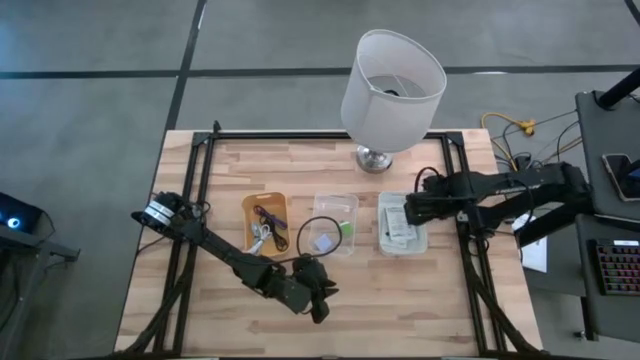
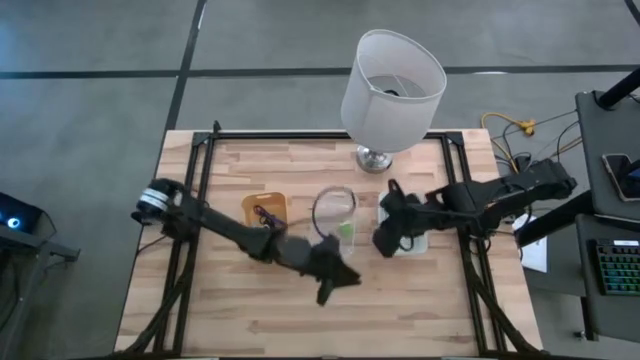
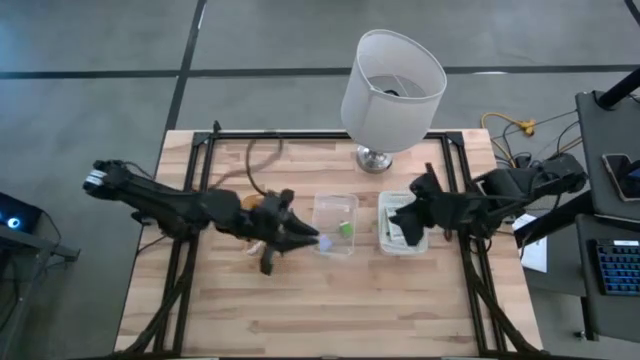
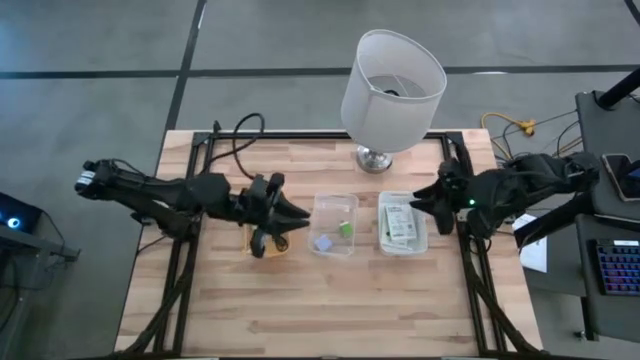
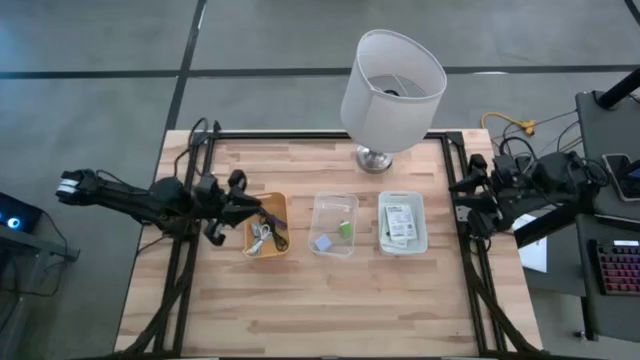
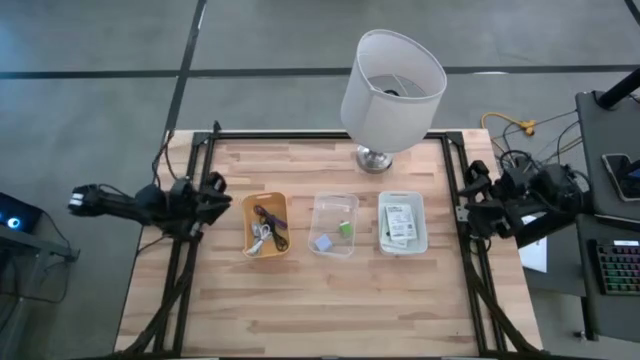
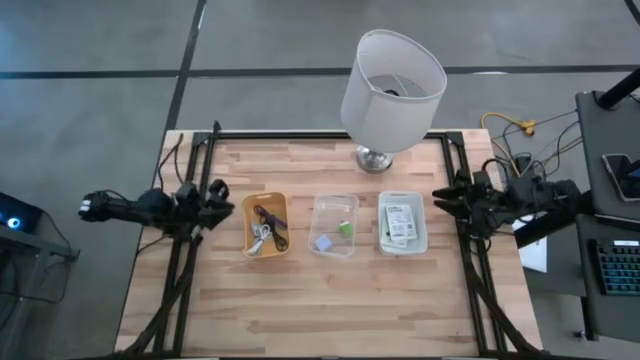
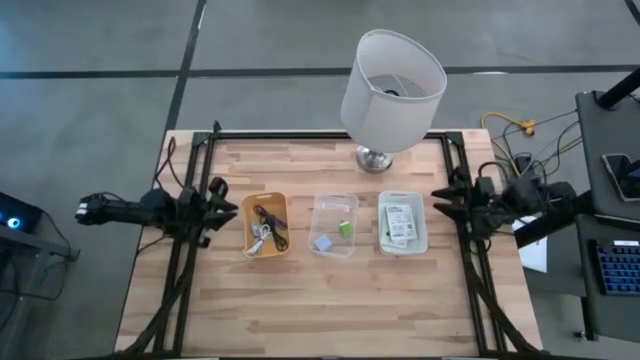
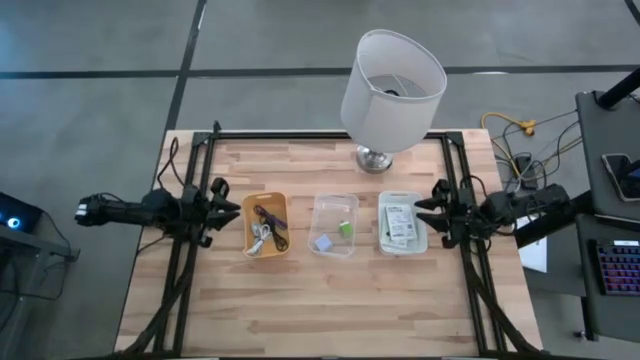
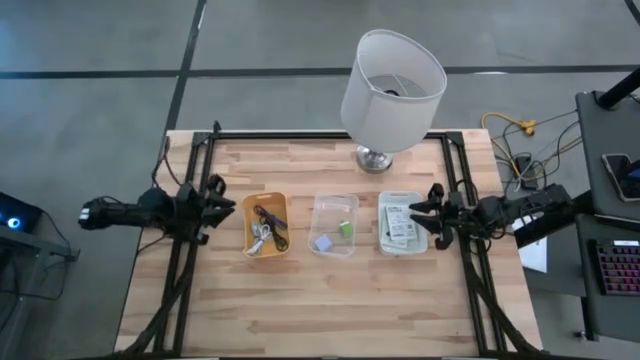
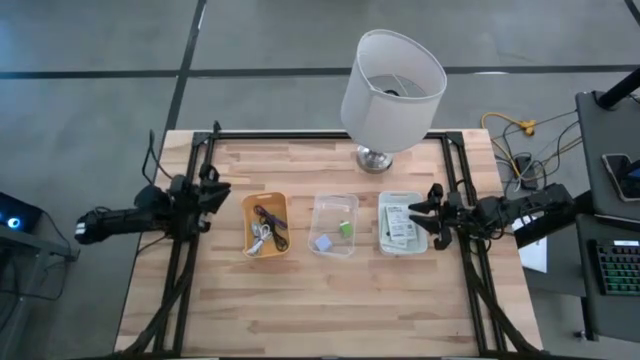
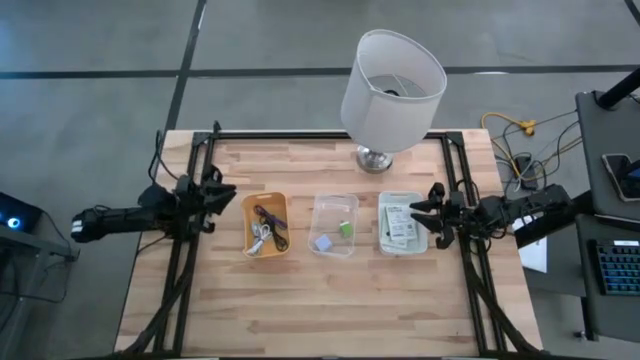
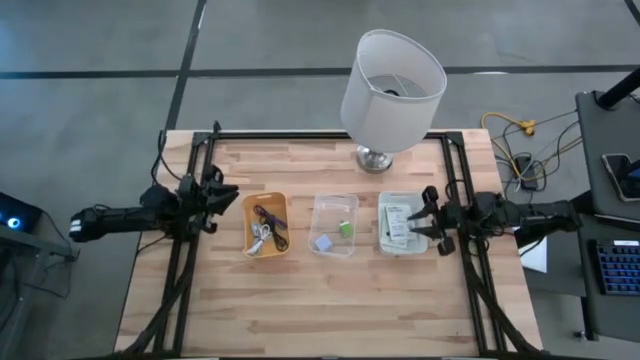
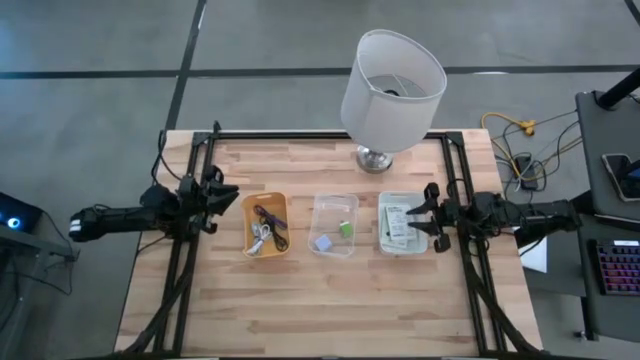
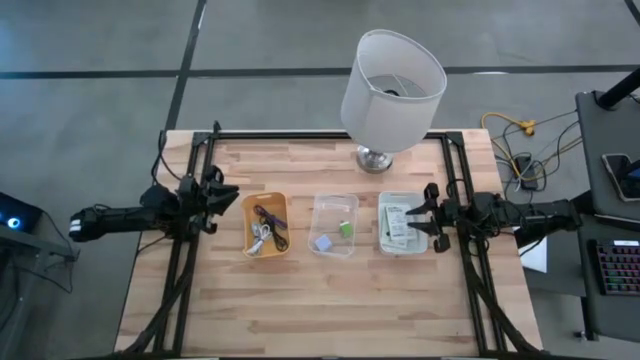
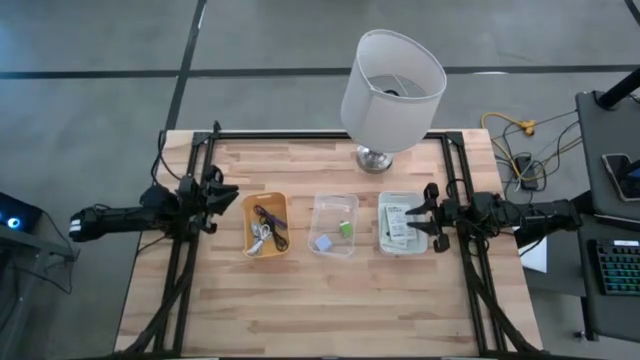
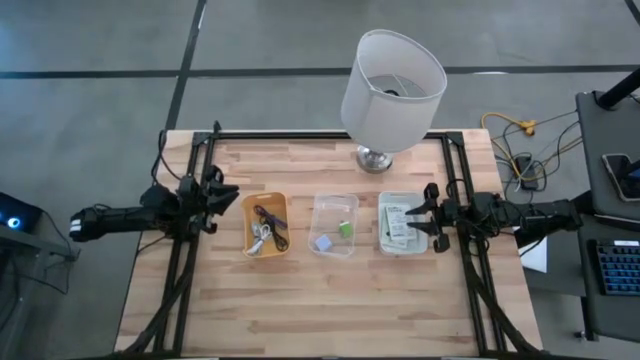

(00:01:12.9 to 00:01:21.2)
Task: Pick and place items into bin
Return to Home Position

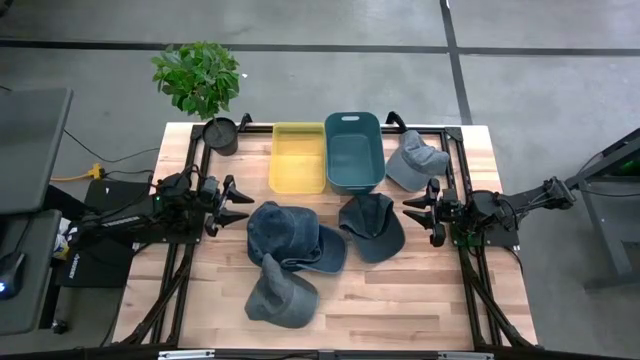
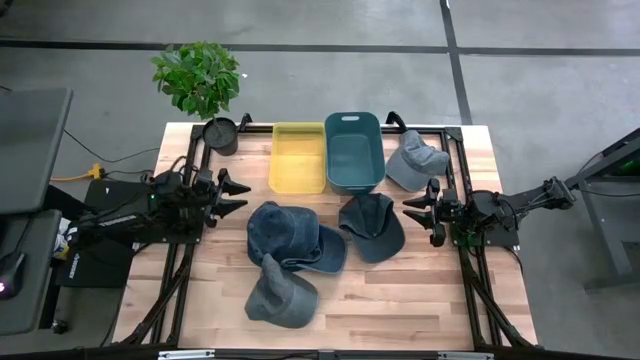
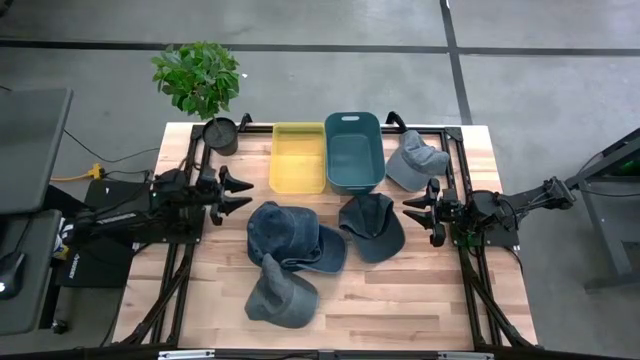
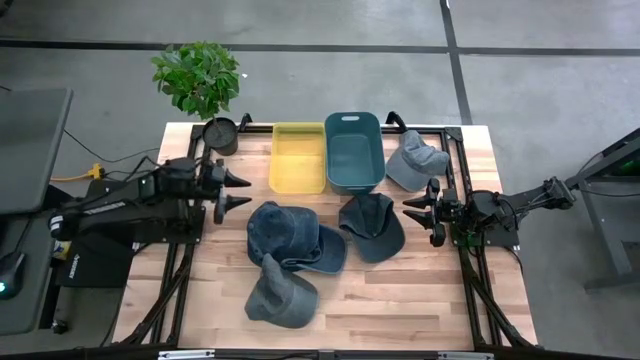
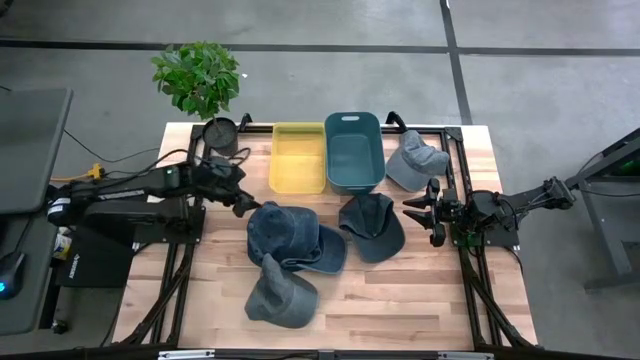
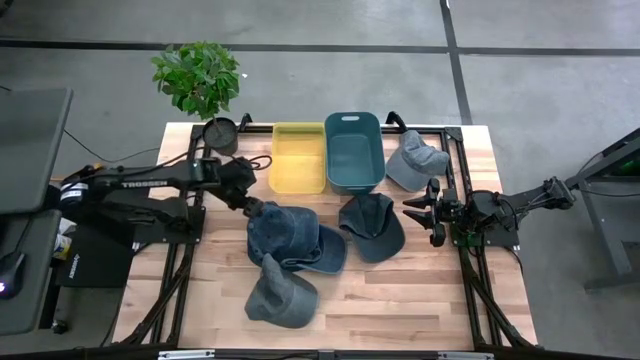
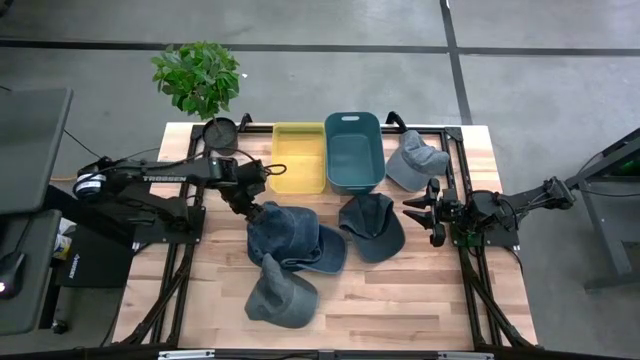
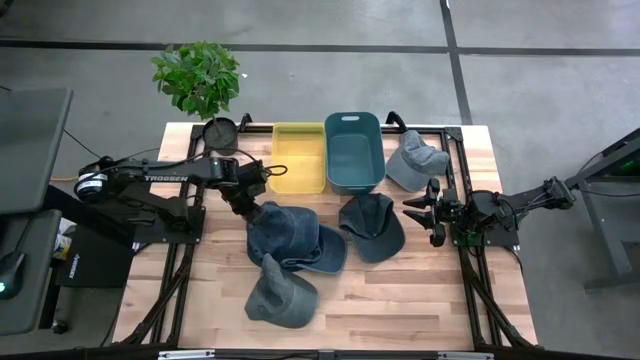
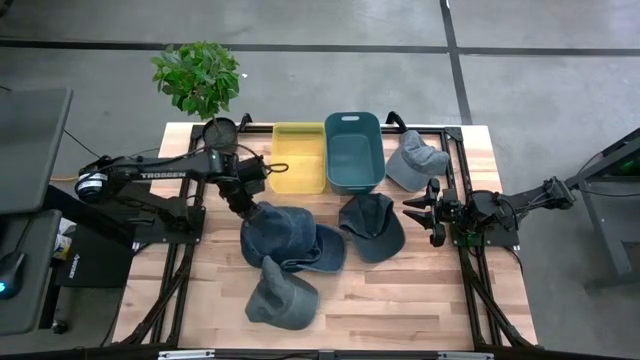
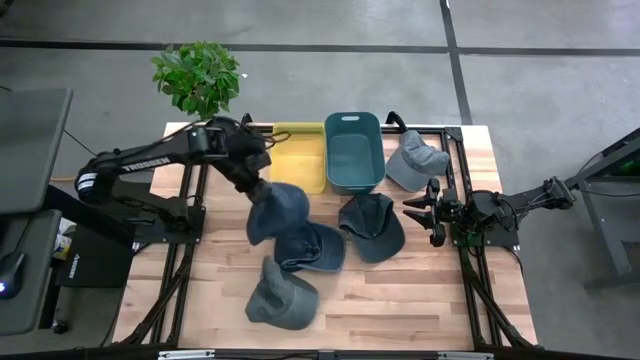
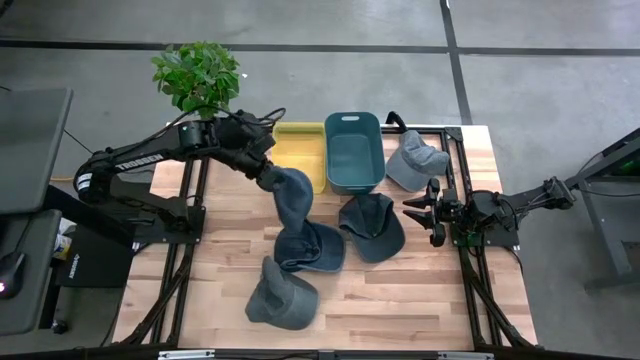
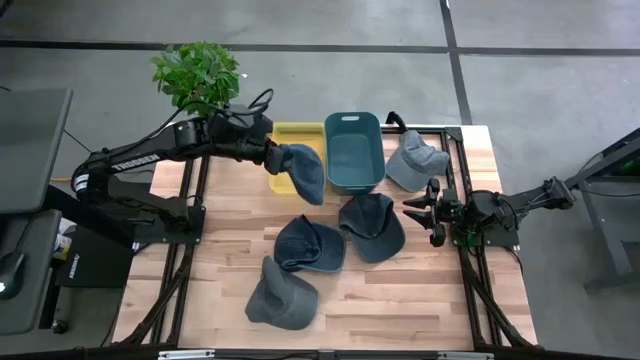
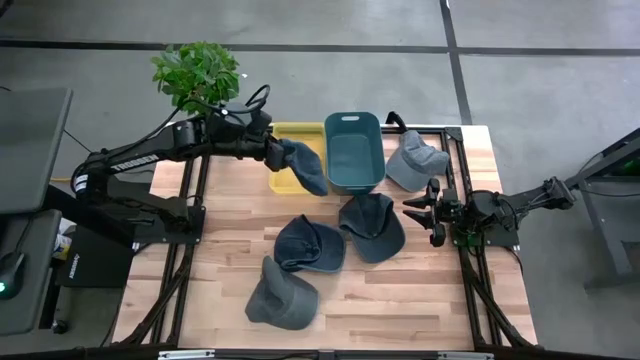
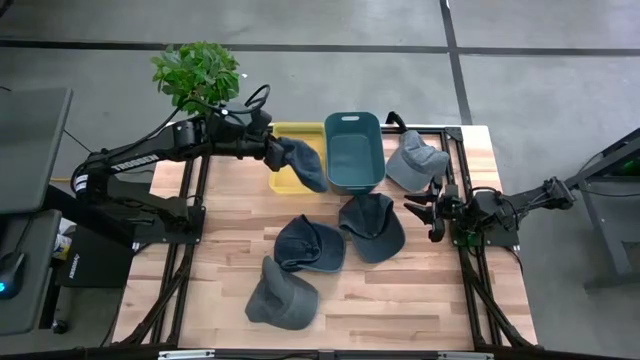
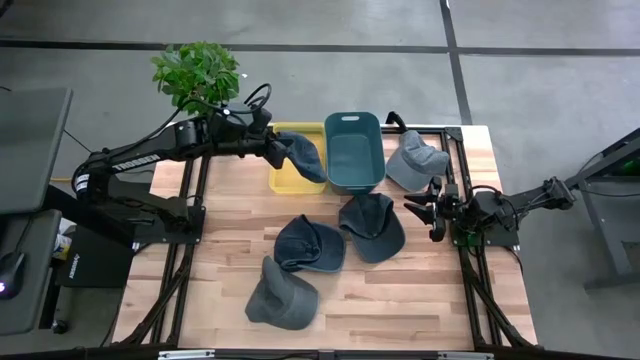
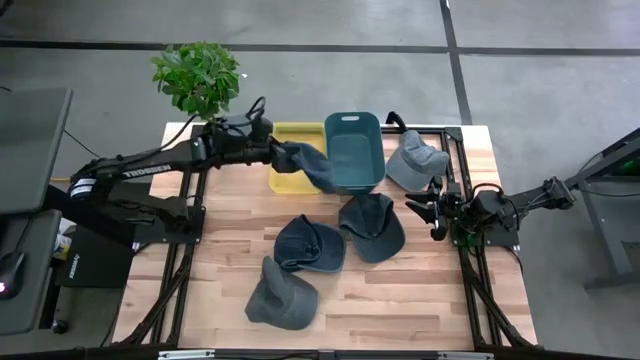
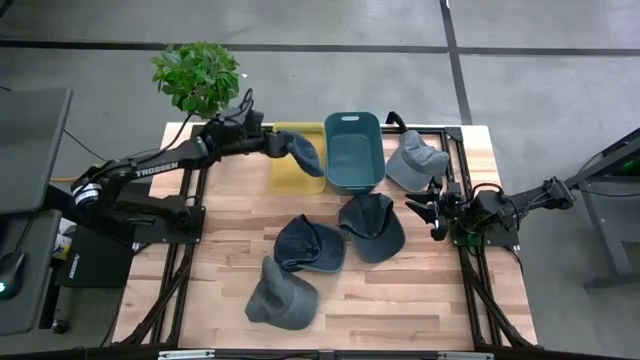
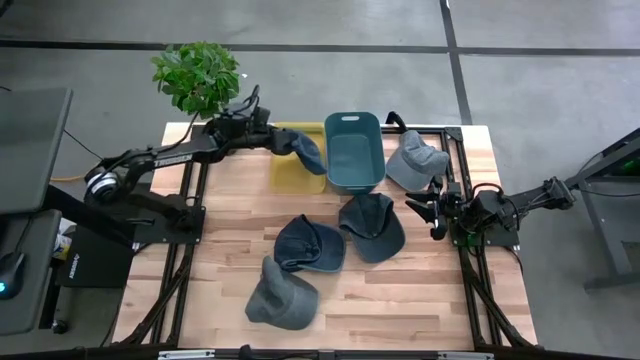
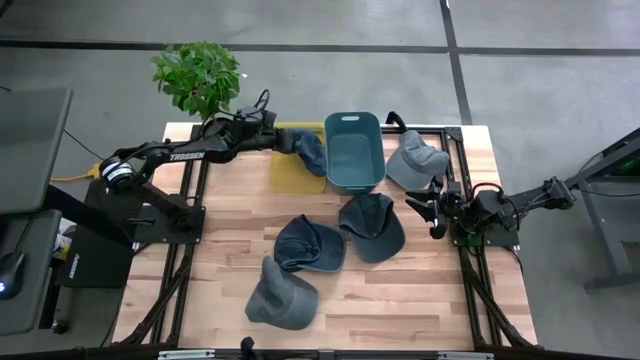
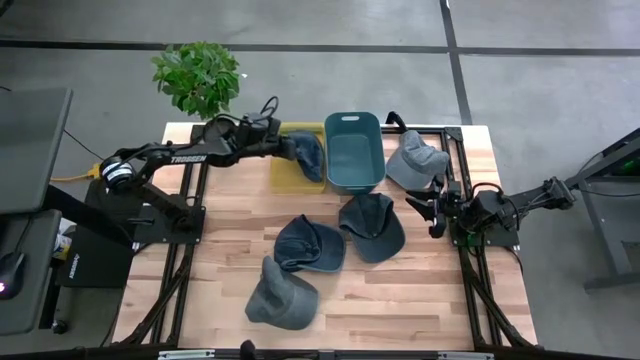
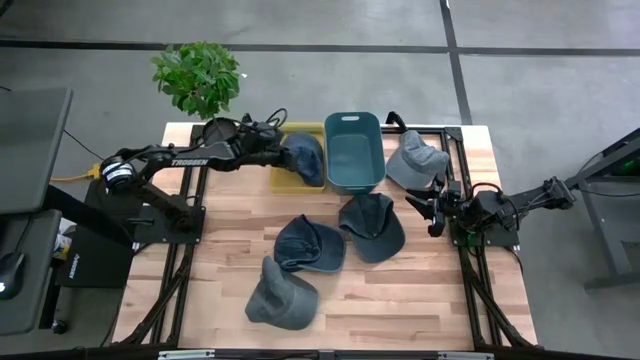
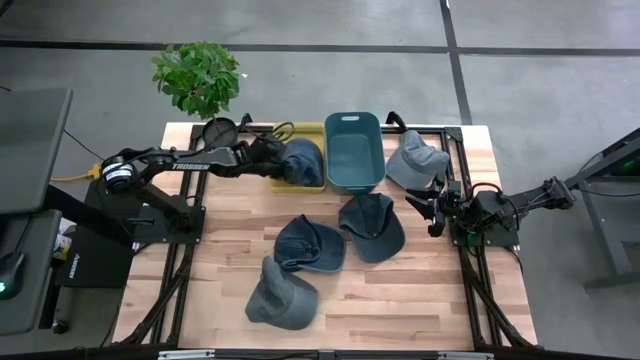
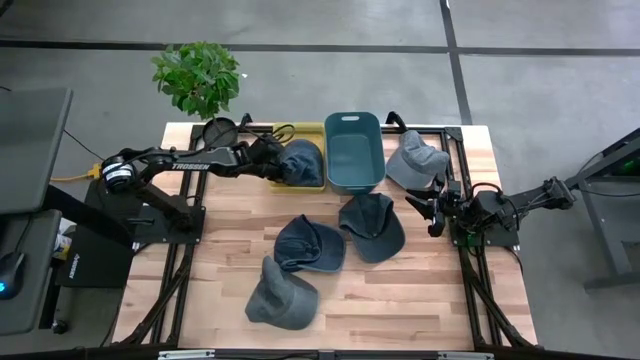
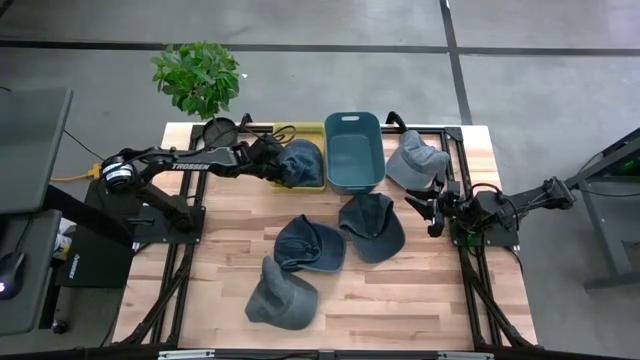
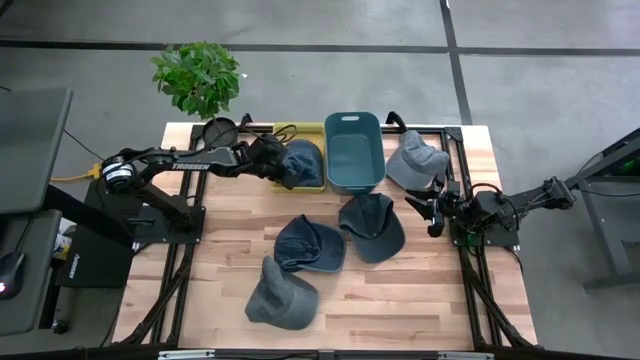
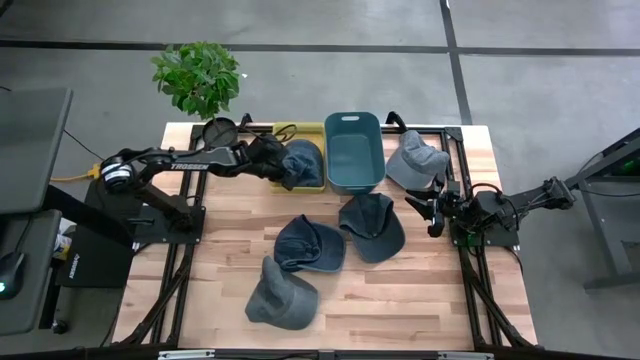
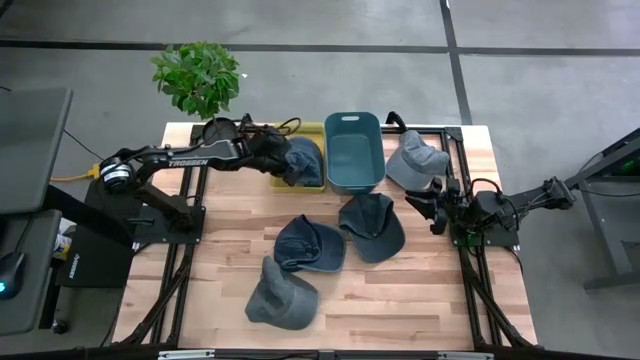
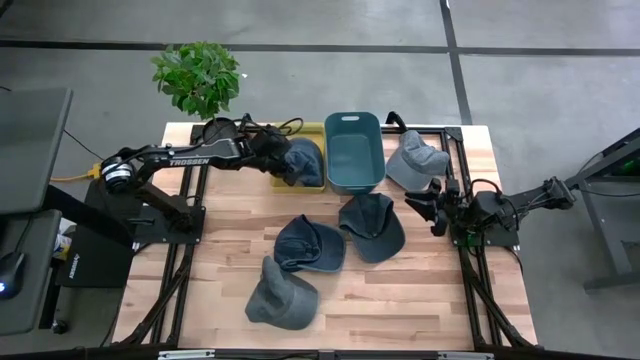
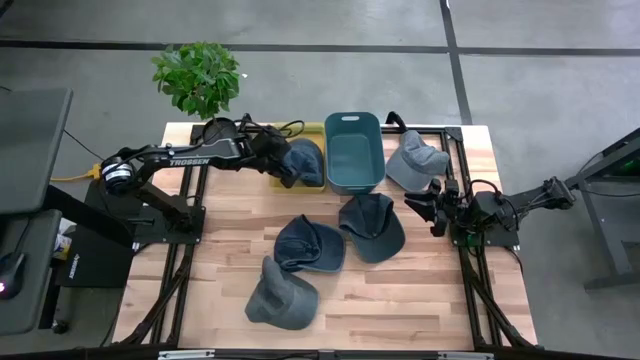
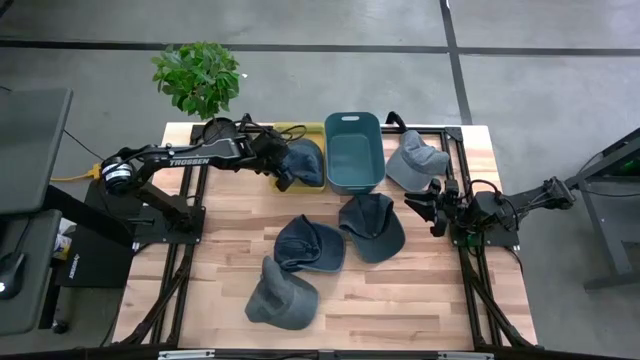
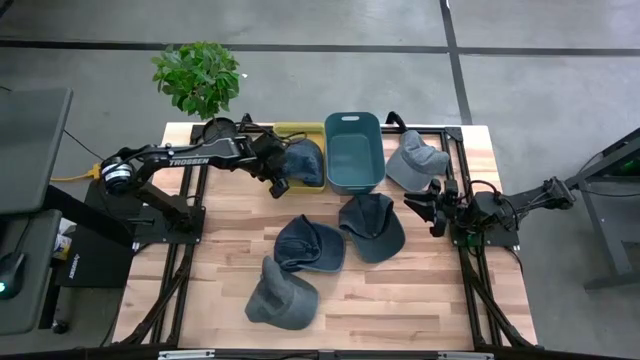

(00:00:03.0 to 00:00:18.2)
Task: Pick & Place hat
Put the left dark blue cap into the yellow bin
